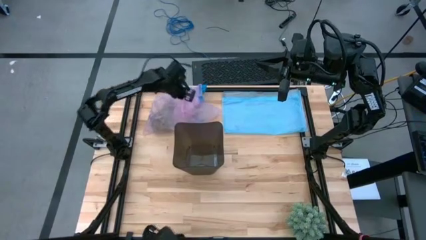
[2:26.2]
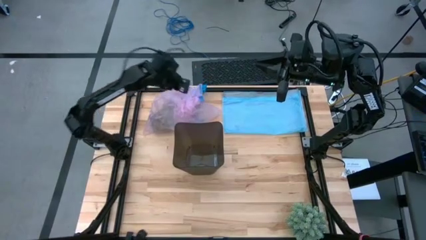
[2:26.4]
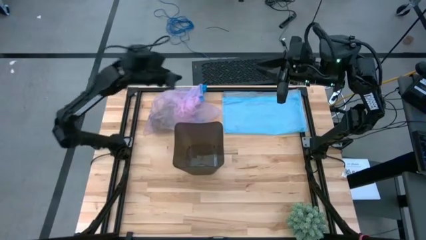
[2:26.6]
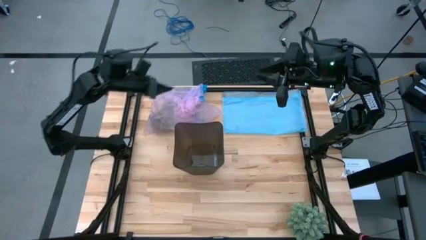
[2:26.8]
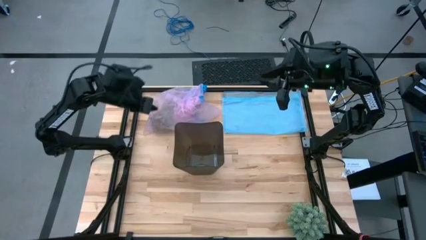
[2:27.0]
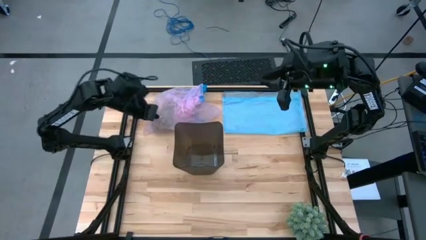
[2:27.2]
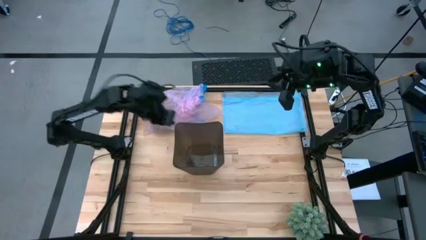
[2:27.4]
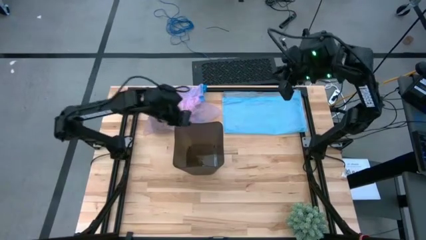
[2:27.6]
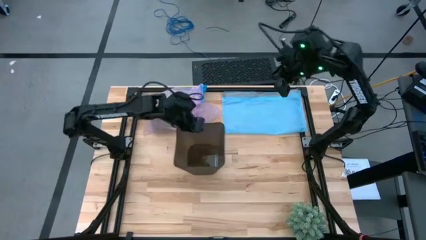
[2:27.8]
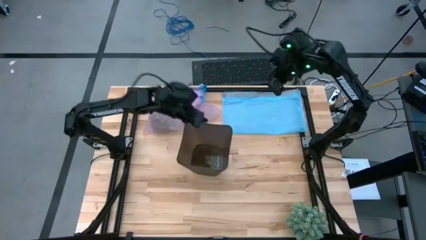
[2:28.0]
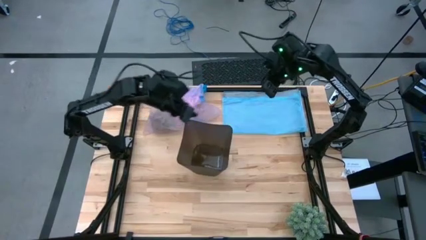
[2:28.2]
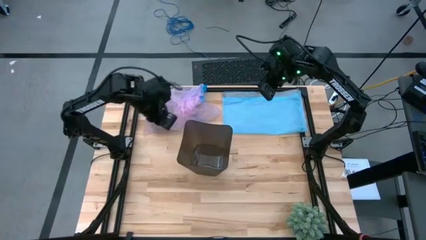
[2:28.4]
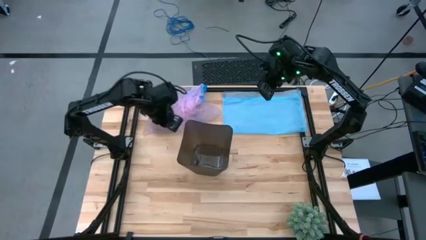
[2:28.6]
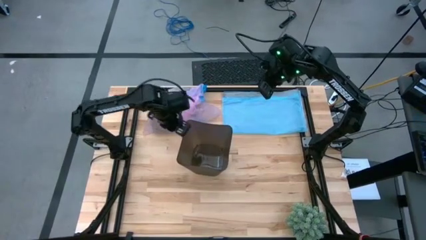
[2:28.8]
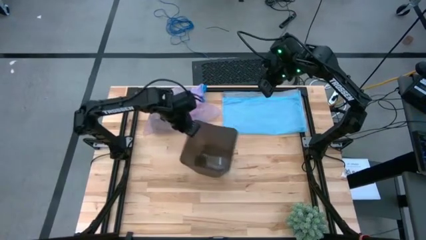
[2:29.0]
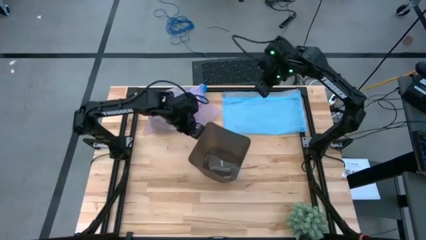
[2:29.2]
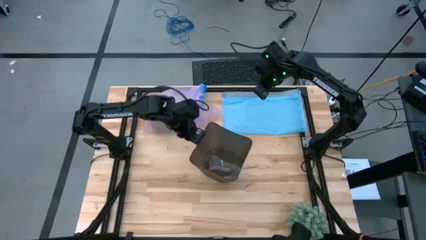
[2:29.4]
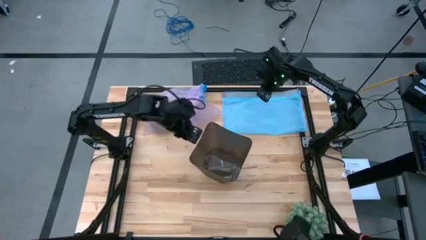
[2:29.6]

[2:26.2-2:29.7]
Task: place trash/remove bag and relplace
Adjust the trash bin

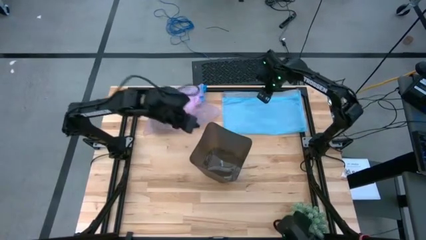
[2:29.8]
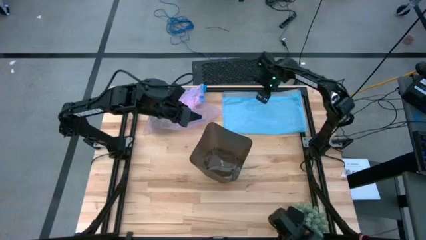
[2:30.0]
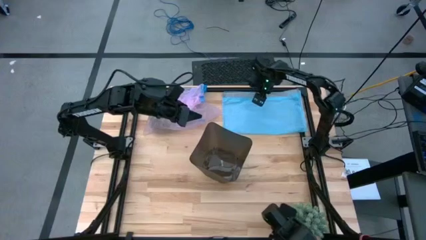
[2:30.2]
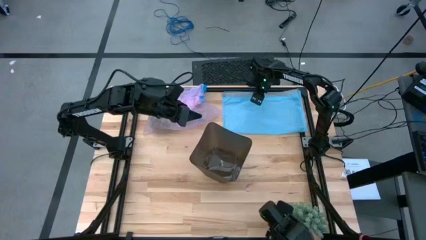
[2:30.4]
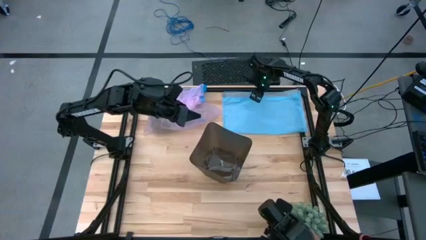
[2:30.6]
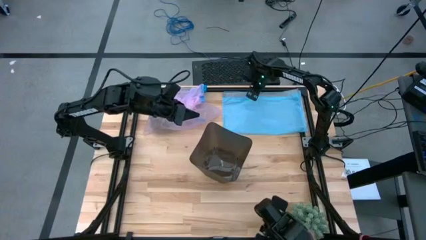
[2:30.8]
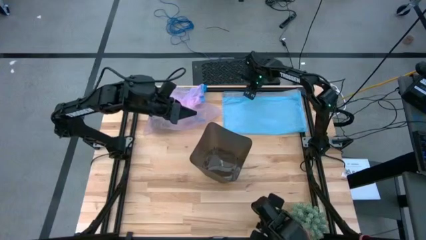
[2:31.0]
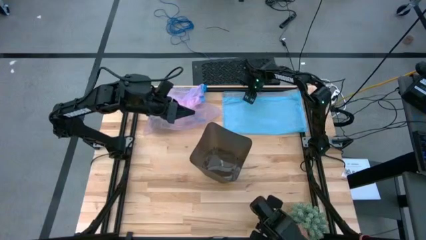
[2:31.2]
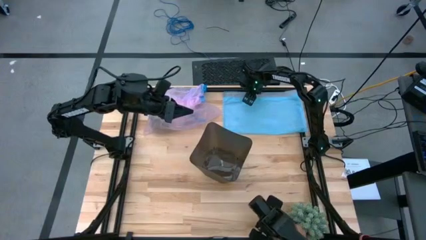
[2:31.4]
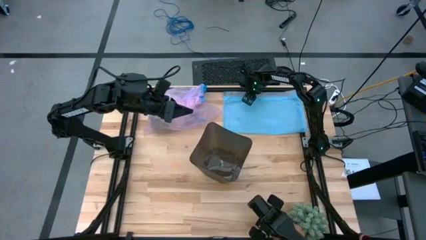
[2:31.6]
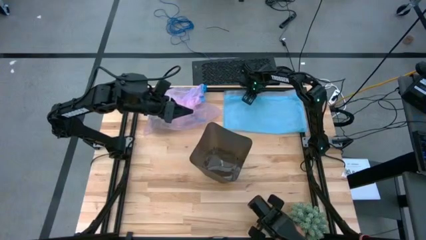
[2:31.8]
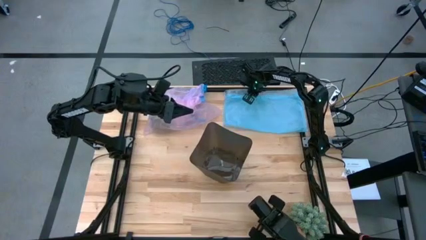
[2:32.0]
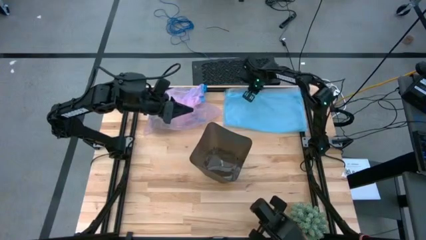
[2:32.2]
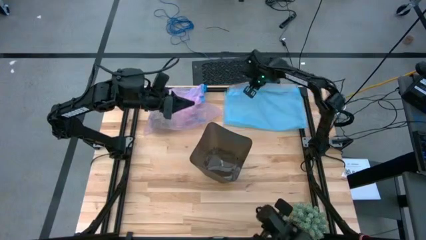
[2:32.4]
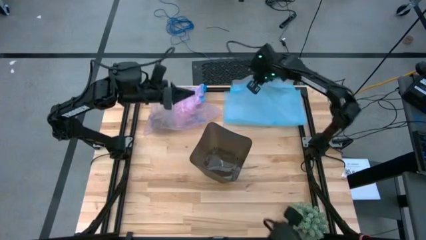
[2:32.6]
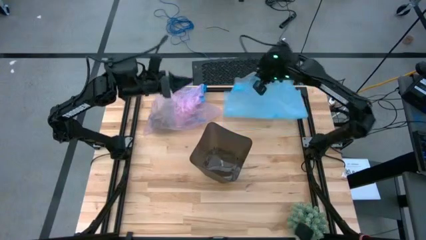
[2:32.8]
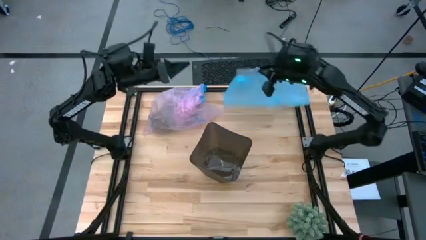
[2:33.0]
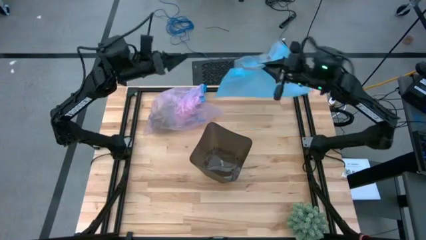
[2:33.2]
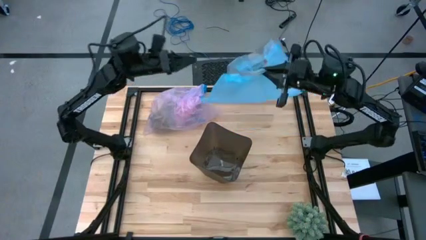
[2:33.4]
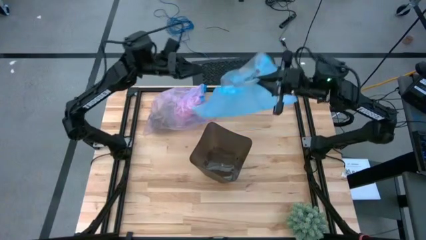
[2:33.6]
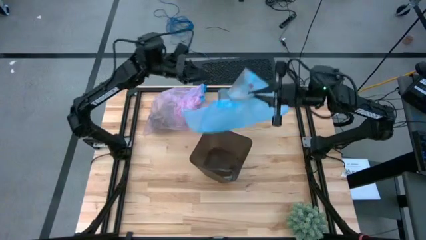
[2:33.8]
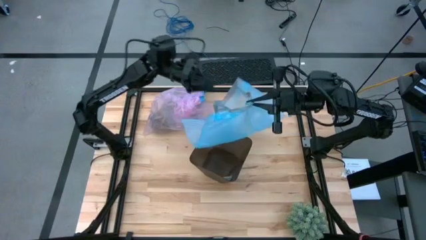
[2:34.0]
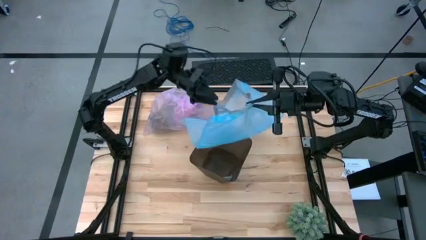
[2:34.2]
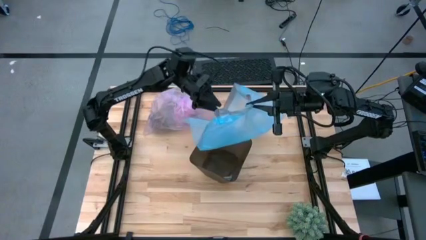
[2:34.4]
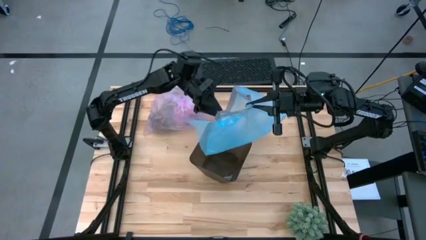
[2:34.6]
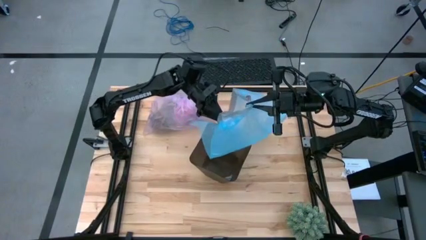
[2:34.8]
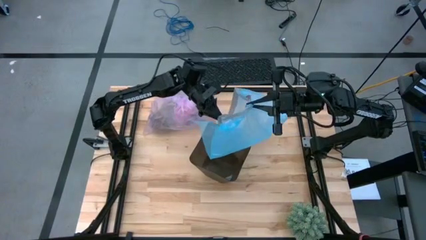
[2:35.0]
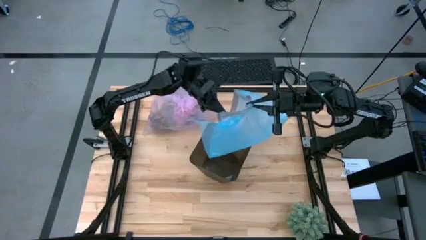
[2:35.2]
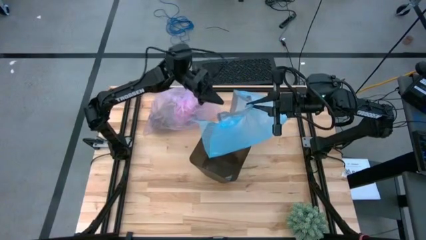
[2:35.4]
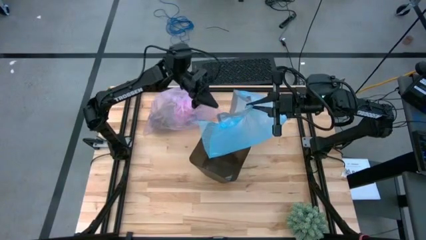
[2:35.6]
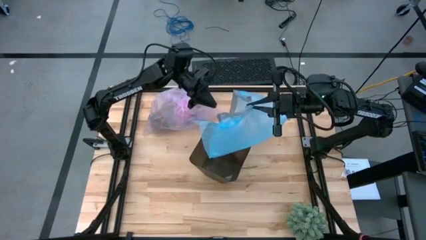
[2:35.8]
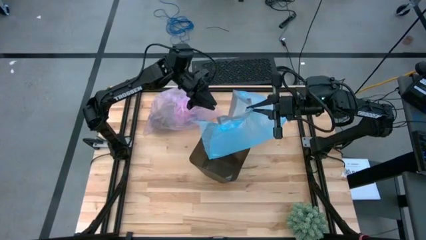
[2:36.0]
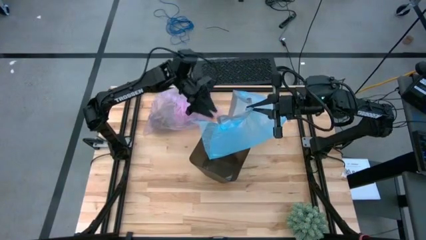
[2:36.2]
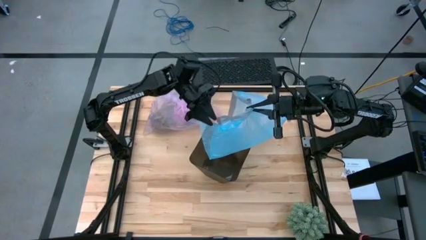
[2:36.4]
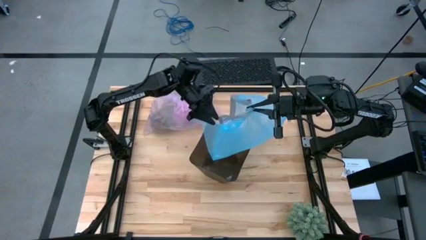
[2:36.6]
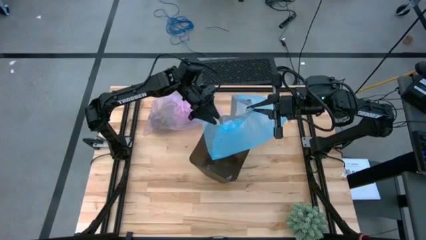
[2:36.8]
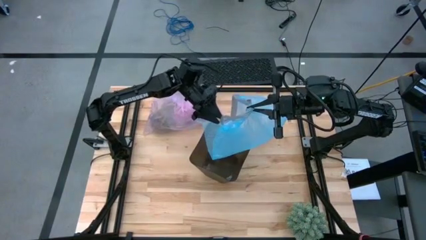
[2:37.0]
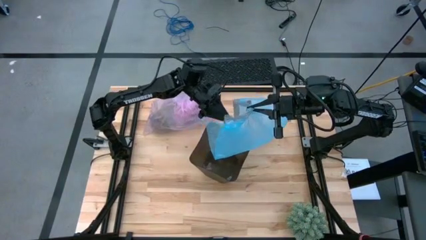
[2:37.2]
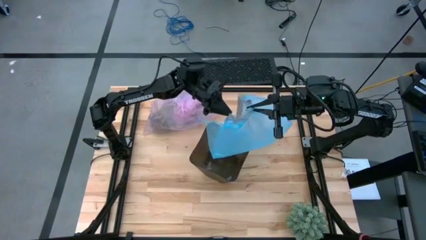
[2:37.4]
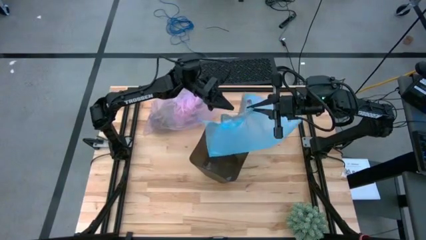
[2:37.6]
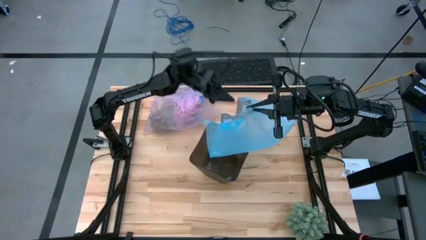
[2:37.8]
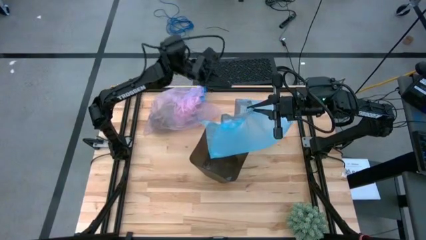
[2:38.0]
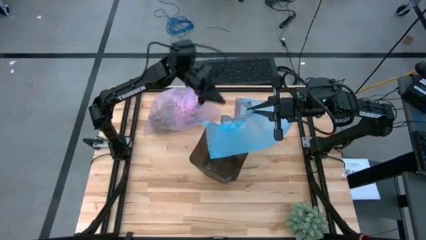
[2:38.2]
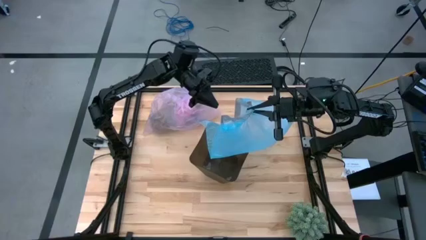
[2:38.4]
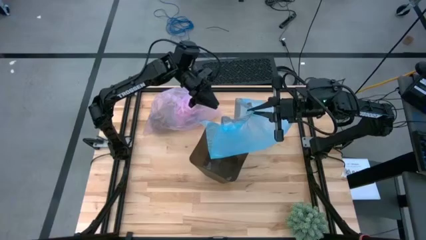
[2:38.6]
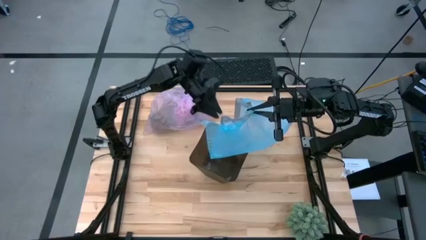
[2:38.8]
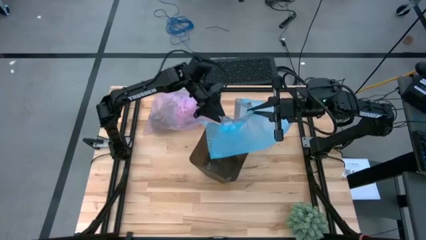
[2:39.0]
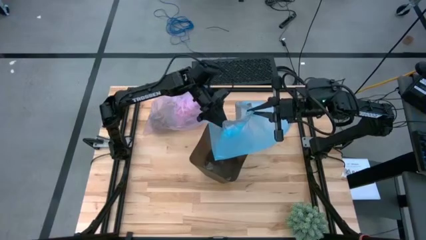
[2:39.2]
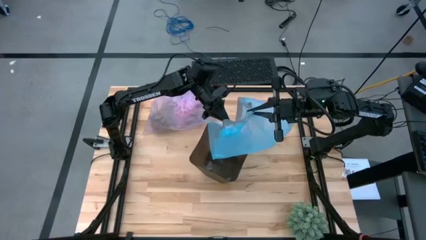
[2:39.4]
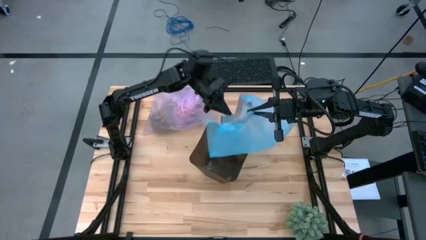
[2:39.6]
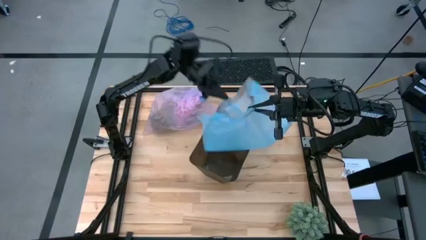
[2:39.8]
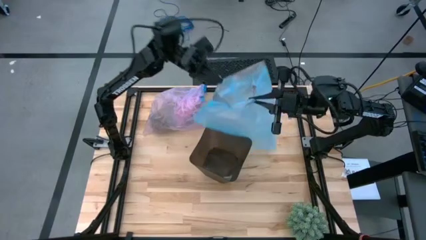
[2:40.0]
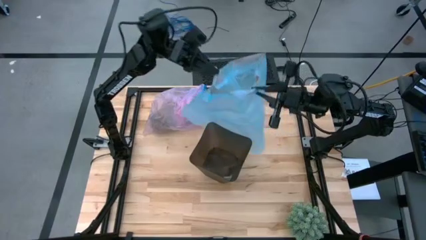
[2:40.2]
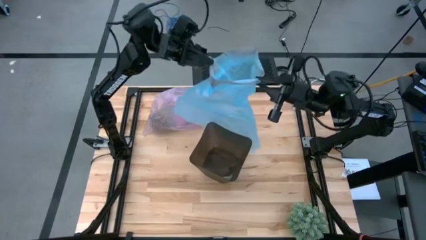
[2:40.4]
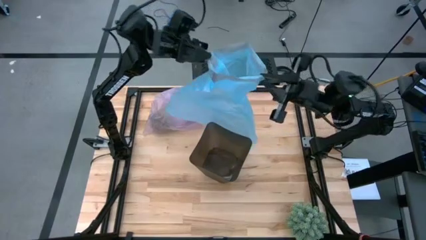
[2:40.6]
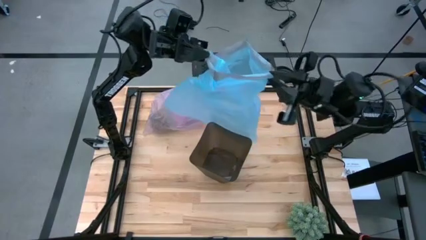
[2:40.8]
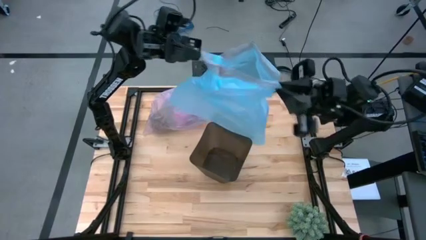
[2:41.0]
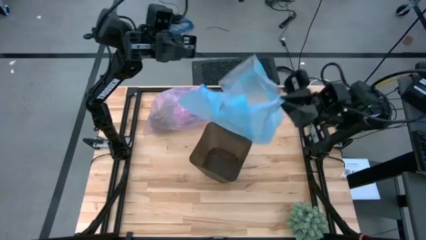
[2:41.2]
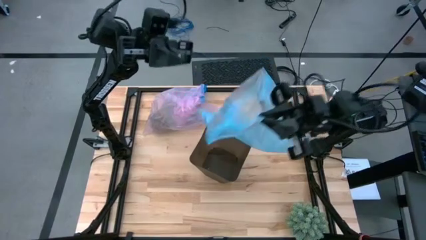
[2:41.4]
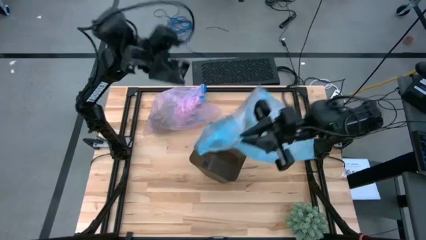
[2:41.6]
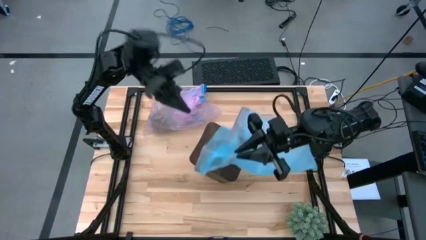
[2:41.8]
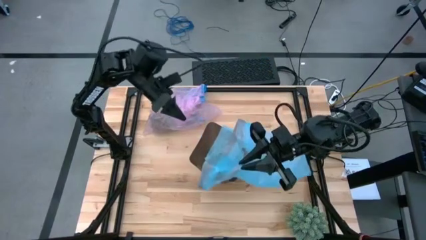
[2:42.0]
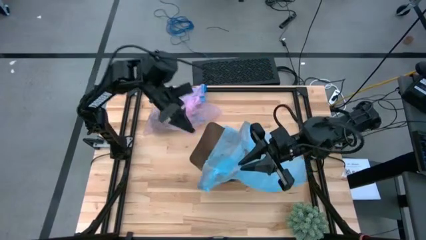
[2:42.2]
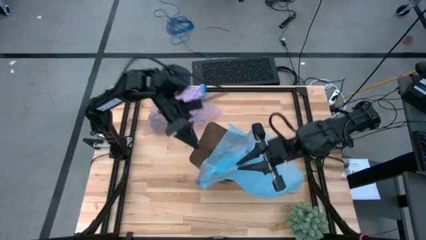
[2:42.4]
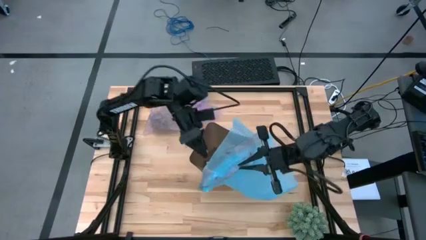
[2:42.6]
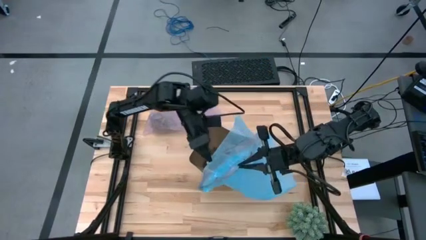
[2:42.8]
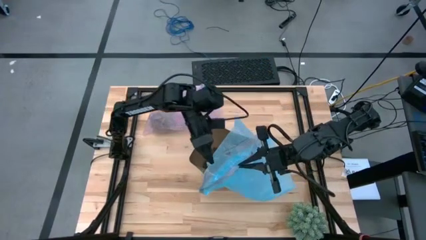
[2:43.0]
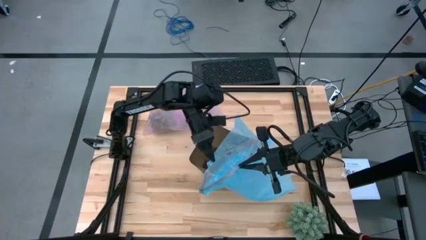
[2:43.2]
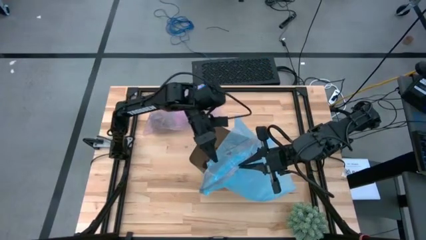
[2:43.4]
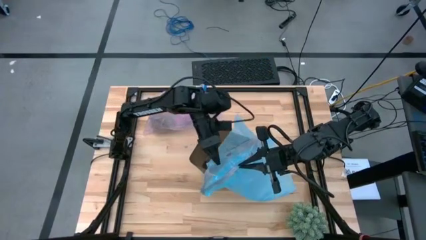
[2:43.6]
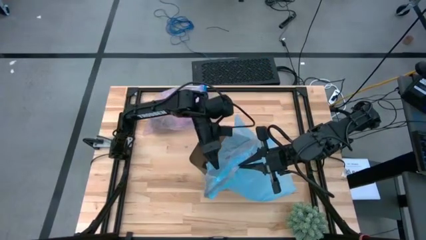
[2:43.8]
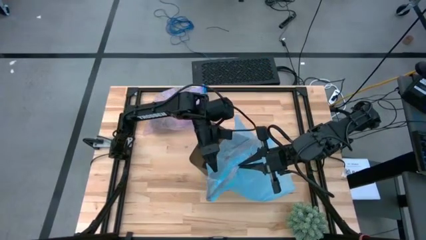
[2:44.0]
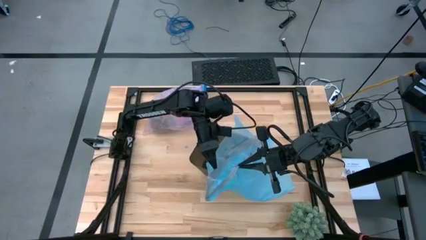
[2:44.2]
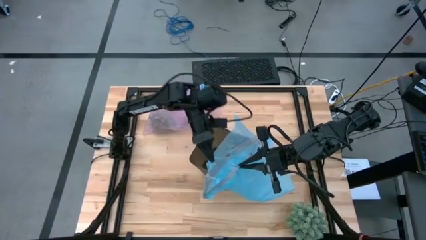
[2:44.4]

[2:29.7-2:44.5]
Insert the new trash bag into the trash bin
